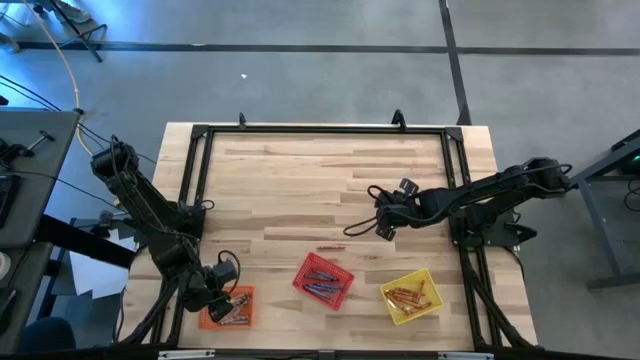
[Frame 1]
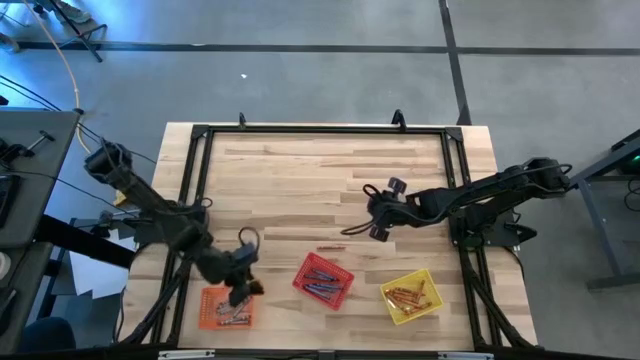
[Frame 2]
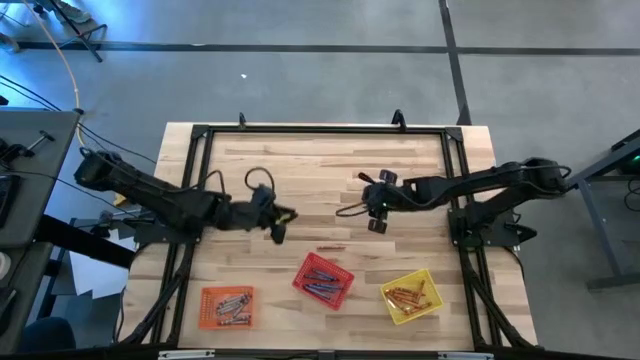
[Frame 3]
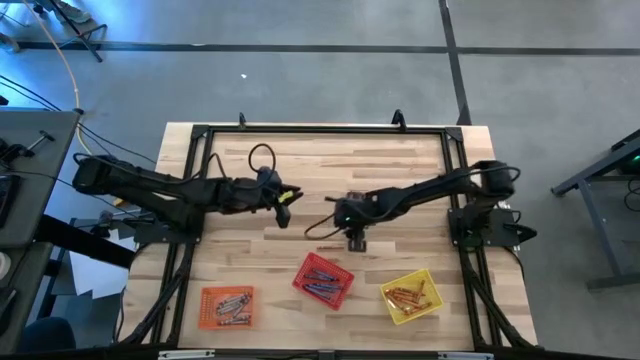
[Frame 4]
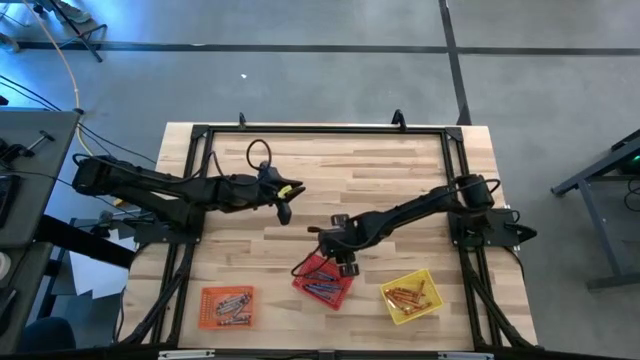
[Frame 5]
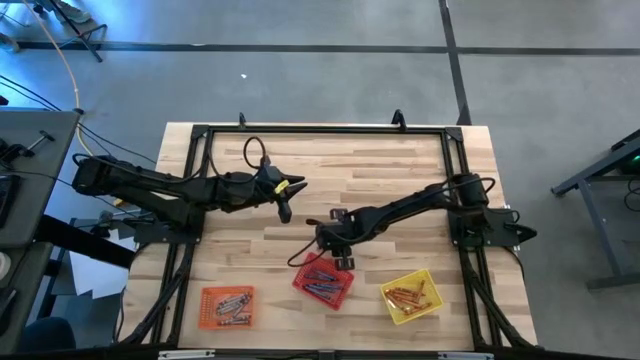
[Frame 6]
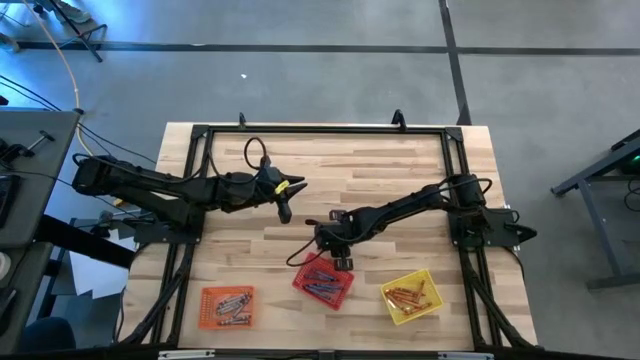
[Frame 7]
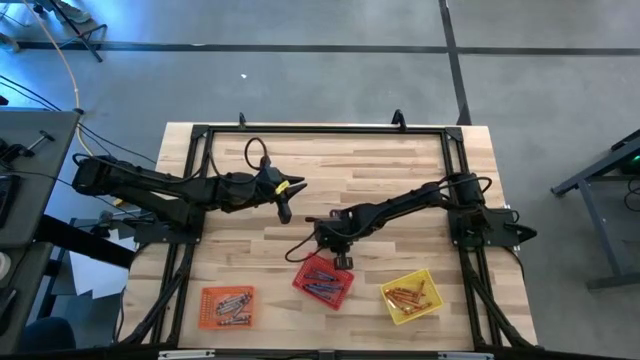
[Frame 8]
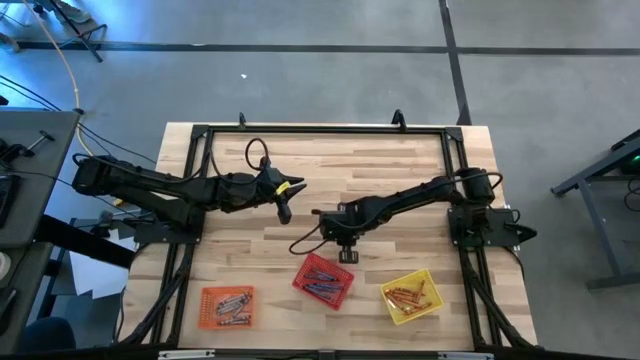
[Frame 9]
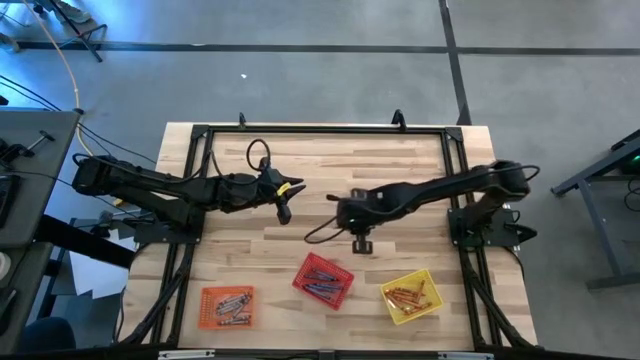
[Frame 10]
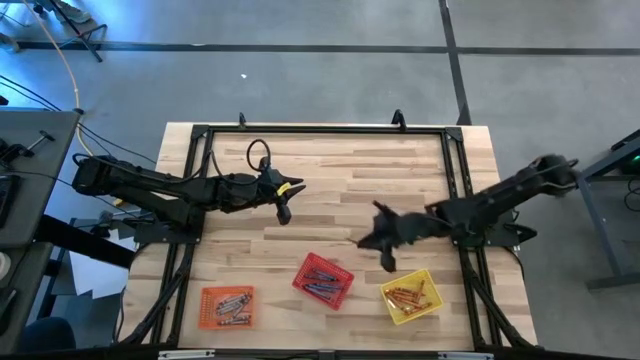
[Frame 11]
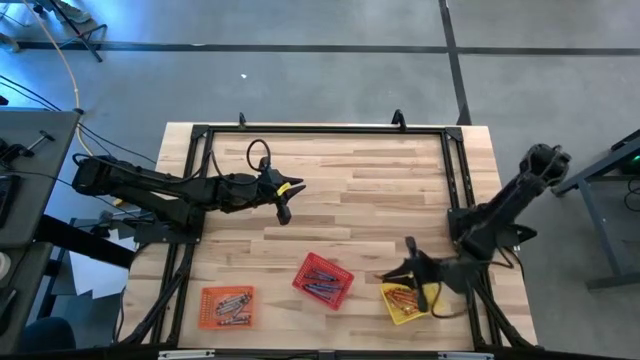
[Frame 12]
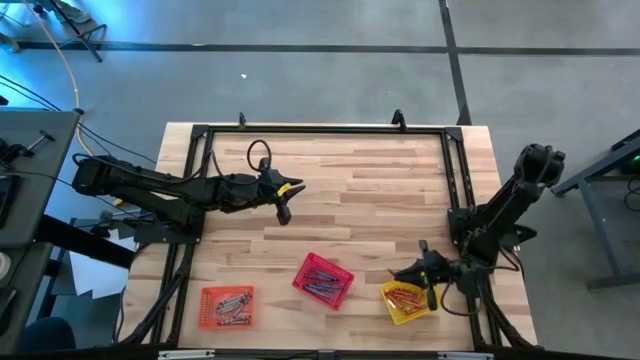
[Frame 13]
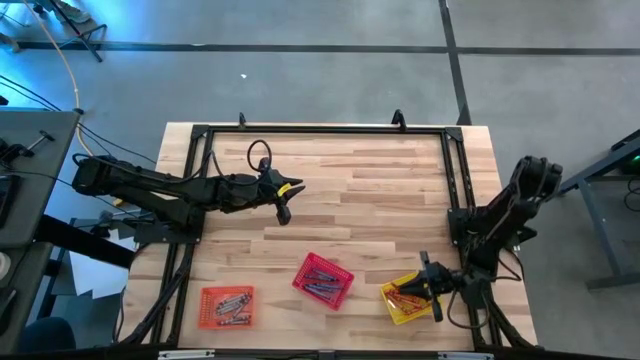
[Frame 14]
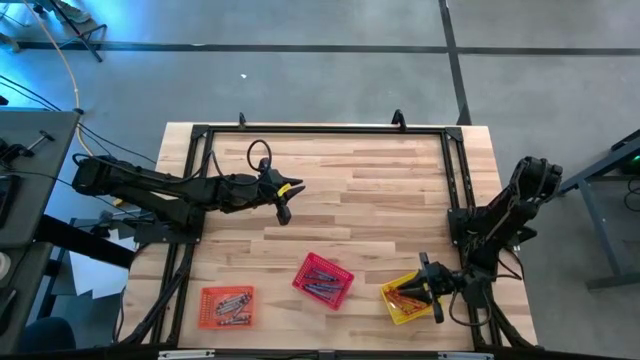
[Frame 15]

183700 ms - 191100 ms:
Task: Sort crayons
Put the orange crayon into the yellow bin

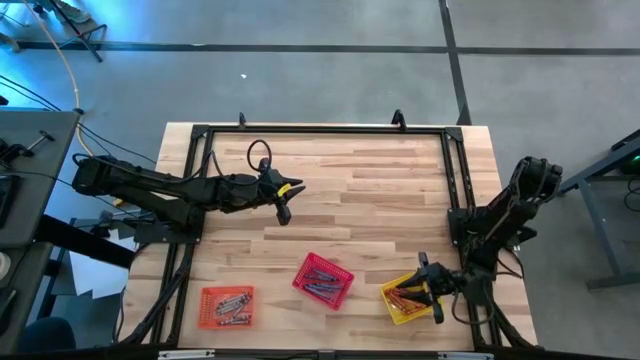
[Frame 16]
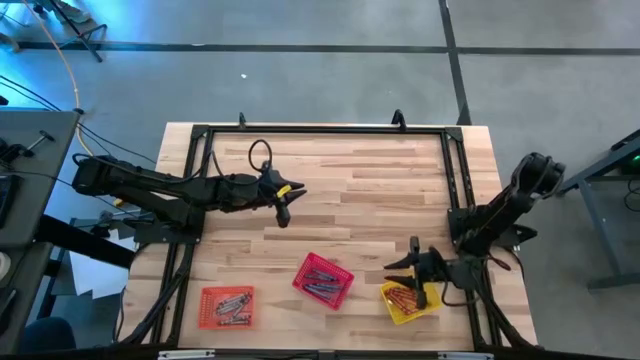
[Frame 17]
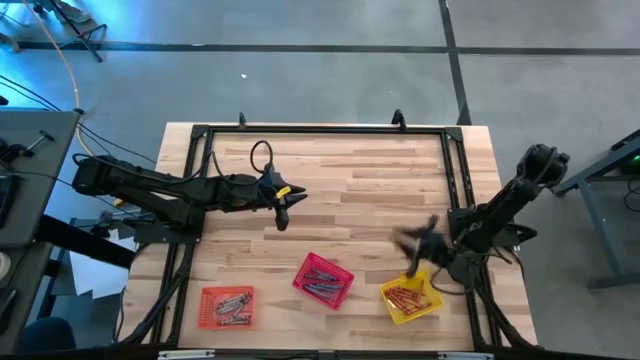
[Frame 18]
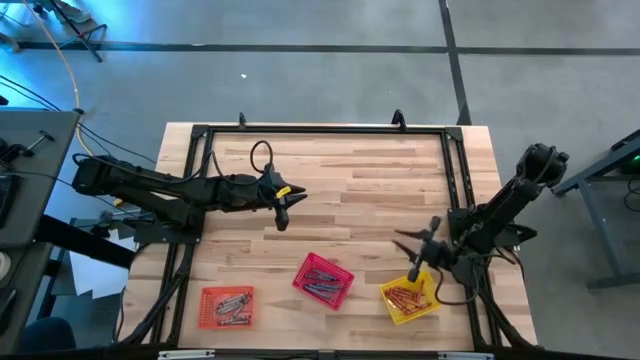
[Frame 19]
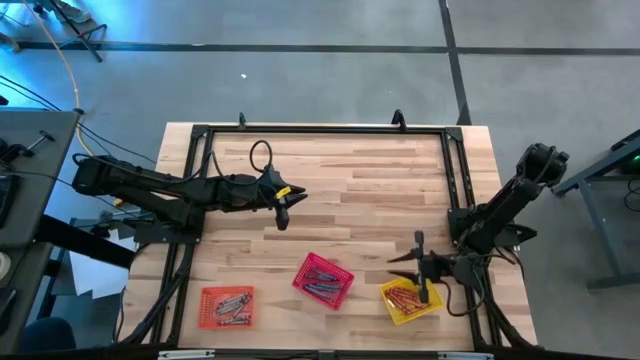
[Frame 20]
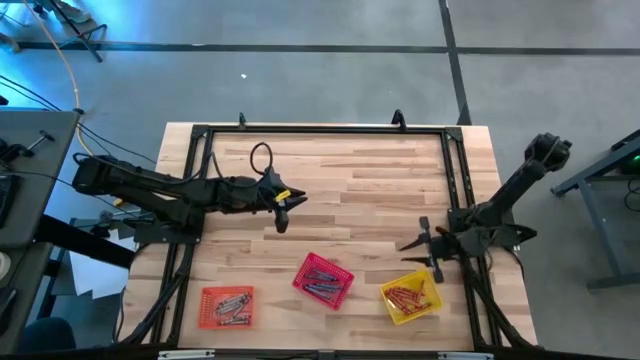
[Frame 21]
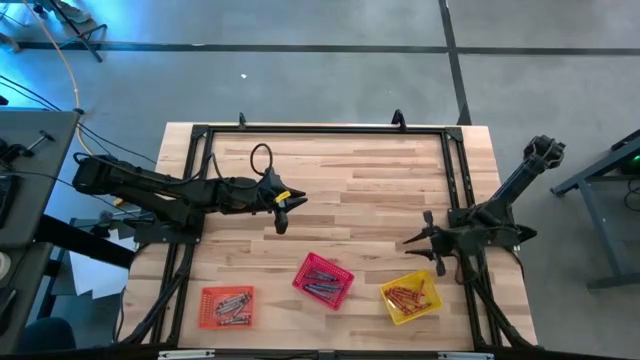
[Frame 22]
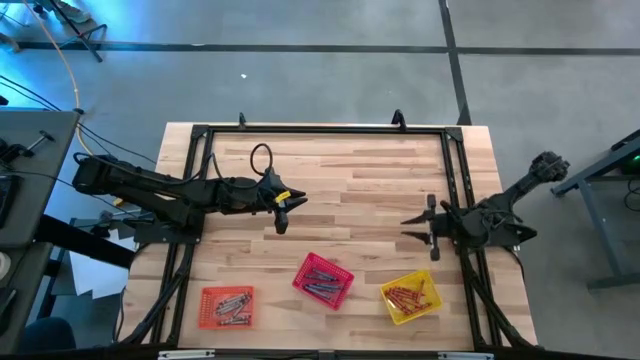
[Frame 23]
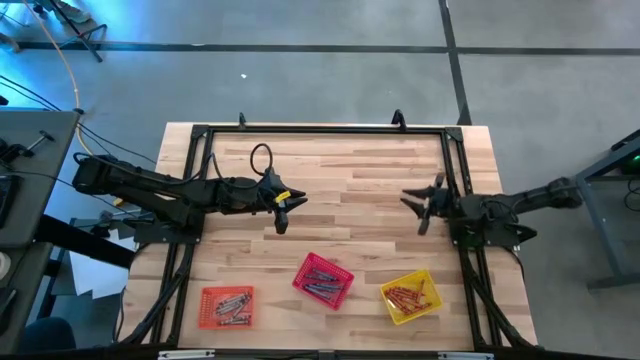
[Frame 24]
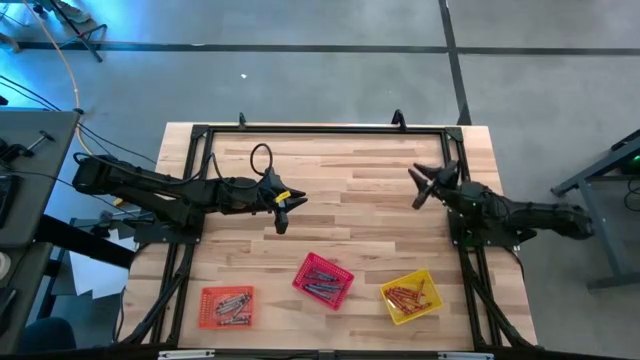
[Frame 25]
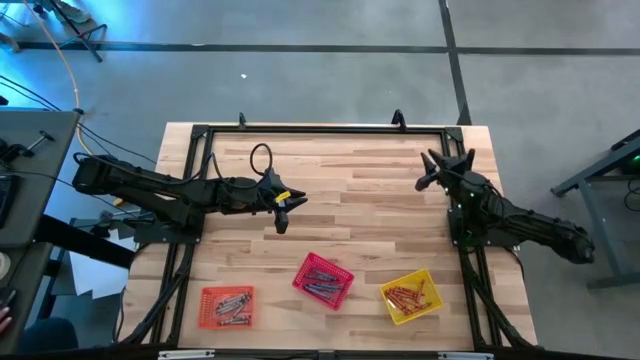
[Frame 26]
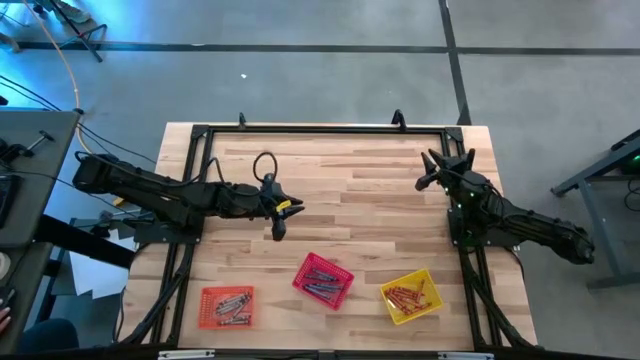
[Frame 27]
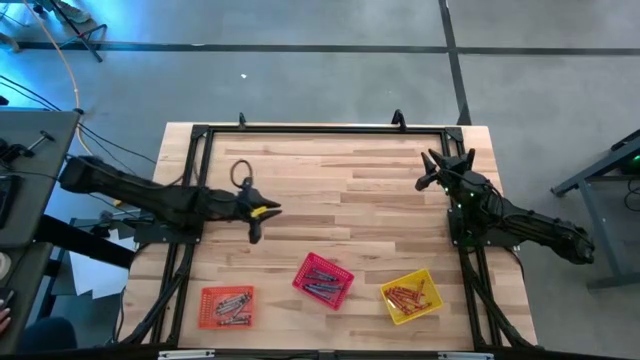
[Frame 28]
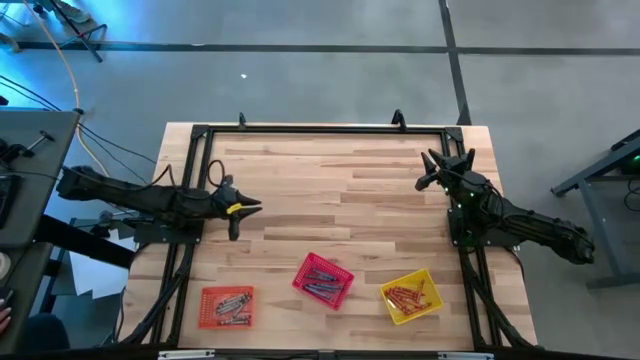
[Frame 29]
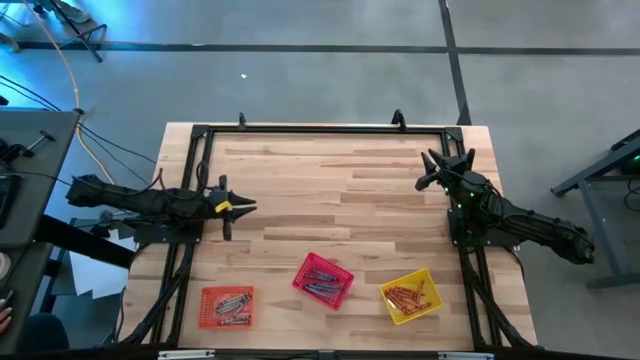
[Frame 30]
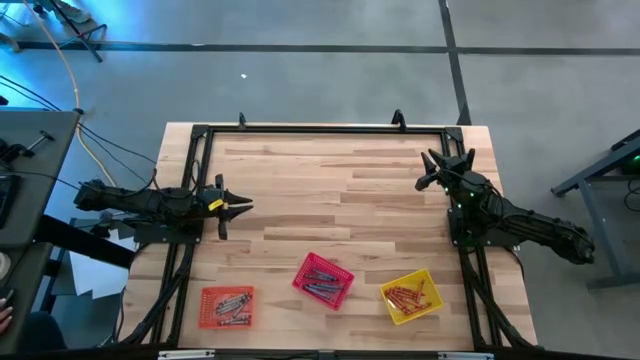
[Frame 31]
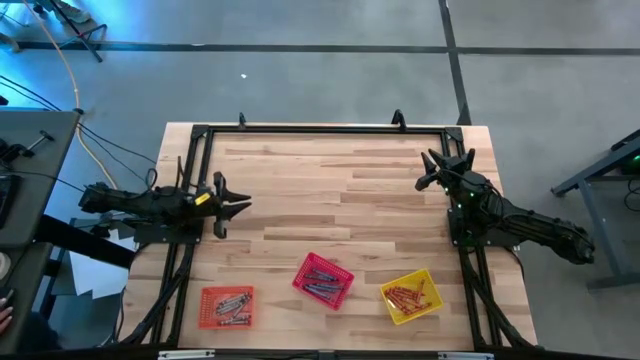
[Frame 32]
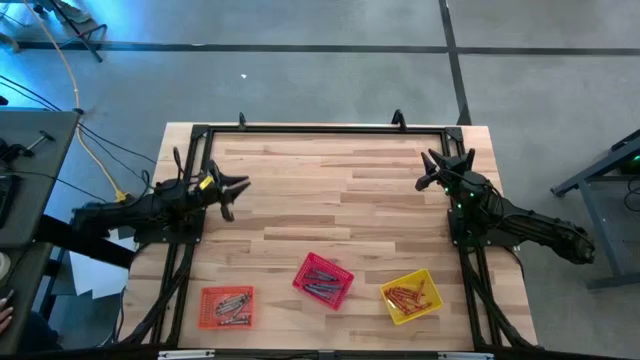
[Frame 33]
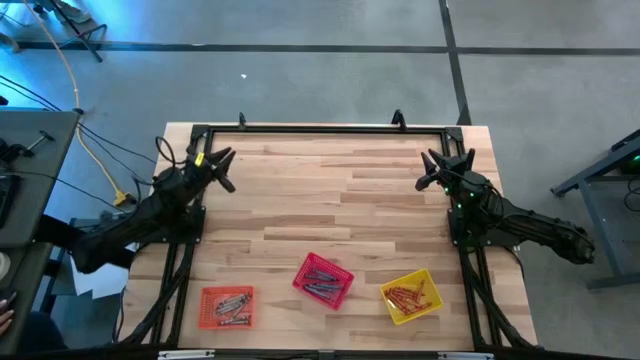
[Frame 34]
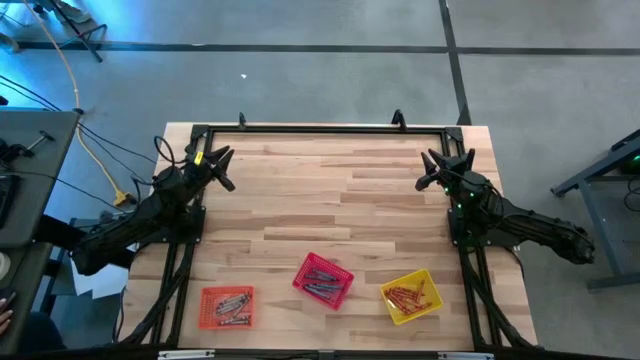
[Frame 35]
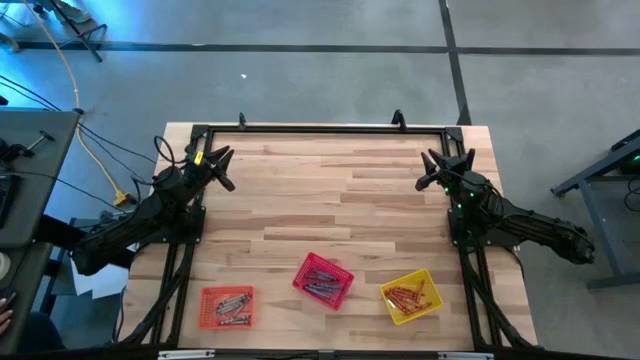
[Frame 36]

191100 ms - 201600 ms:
Return to Home Position
